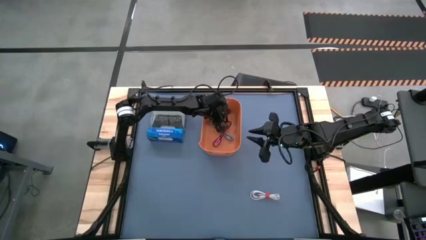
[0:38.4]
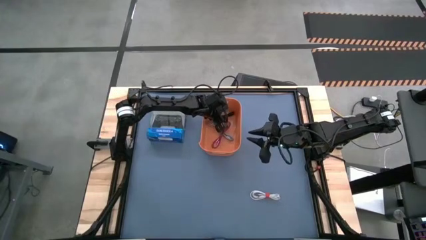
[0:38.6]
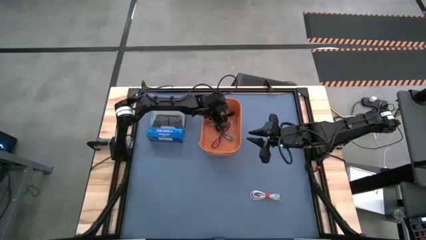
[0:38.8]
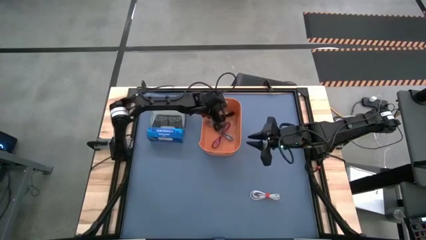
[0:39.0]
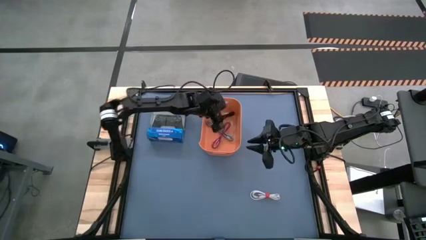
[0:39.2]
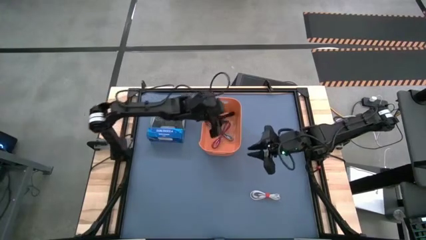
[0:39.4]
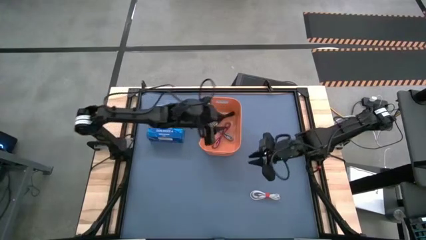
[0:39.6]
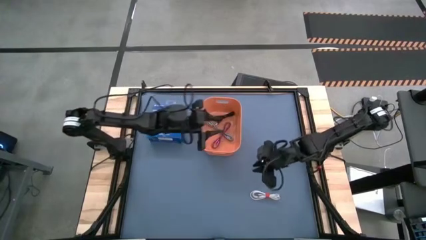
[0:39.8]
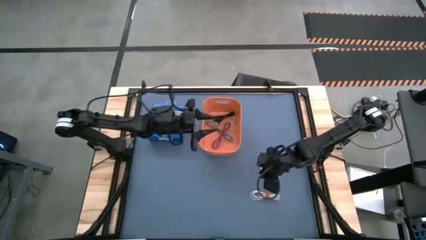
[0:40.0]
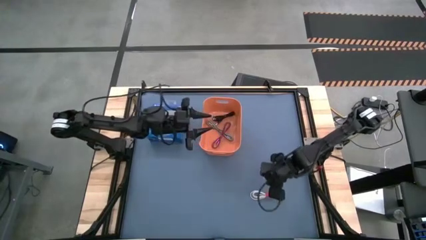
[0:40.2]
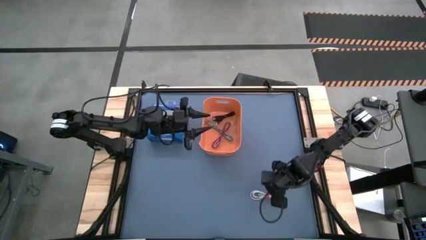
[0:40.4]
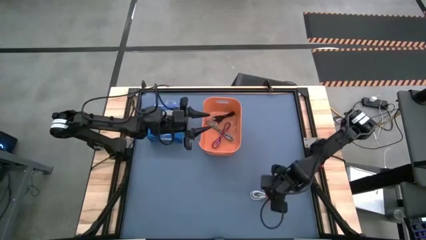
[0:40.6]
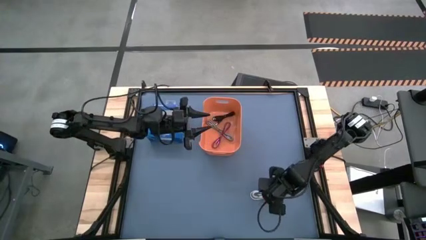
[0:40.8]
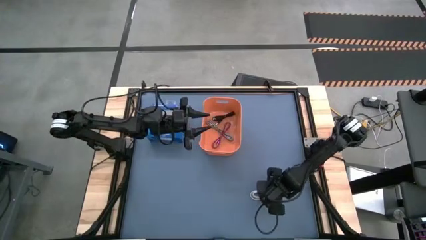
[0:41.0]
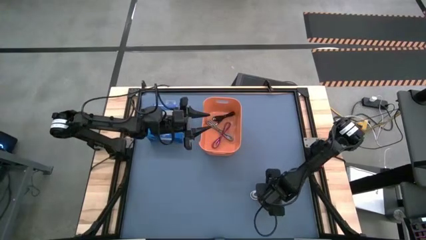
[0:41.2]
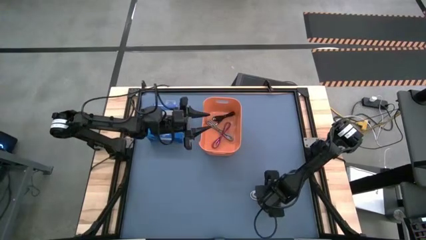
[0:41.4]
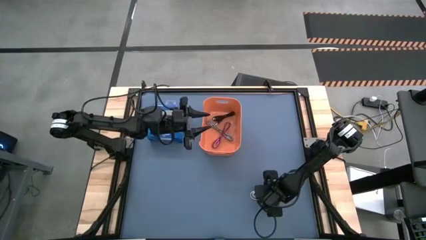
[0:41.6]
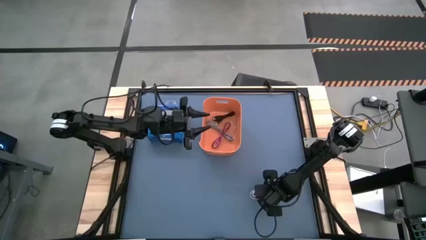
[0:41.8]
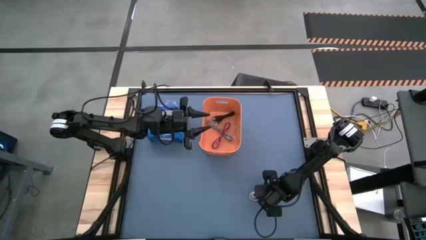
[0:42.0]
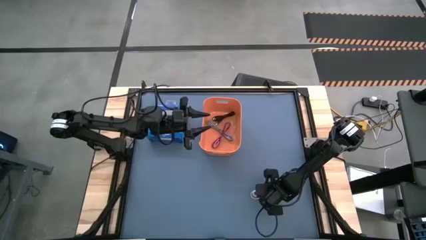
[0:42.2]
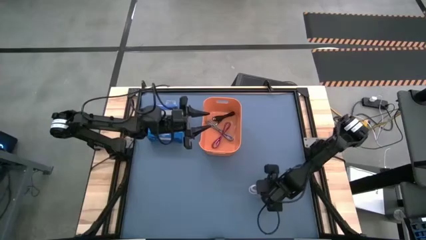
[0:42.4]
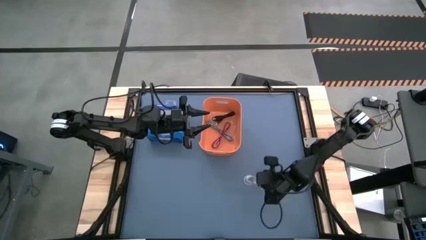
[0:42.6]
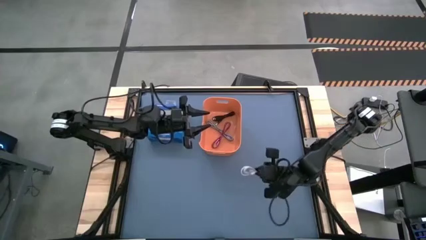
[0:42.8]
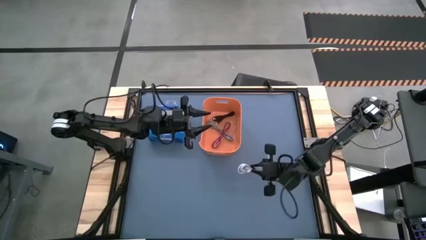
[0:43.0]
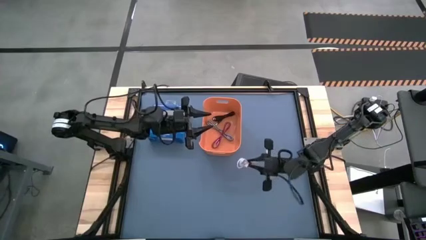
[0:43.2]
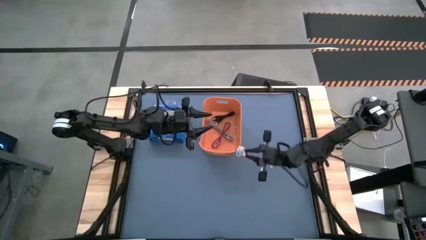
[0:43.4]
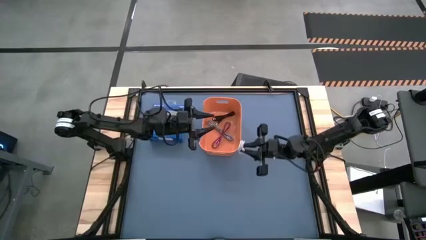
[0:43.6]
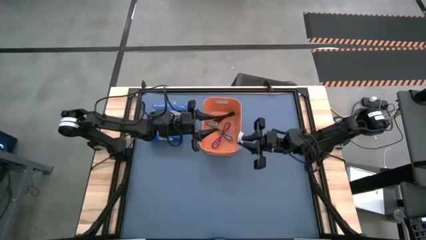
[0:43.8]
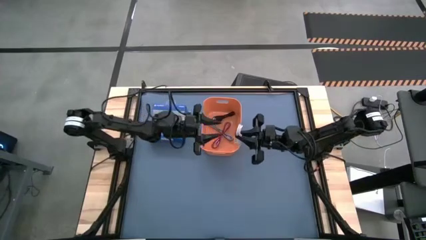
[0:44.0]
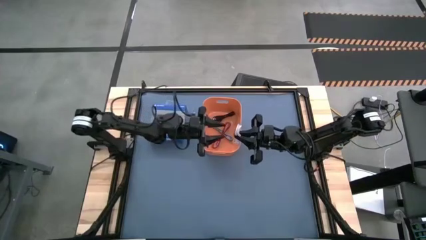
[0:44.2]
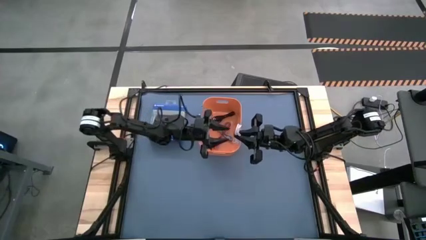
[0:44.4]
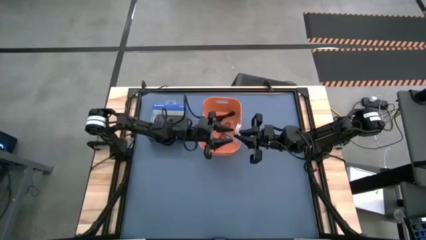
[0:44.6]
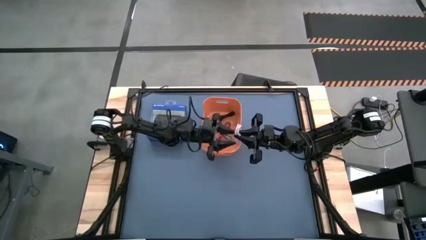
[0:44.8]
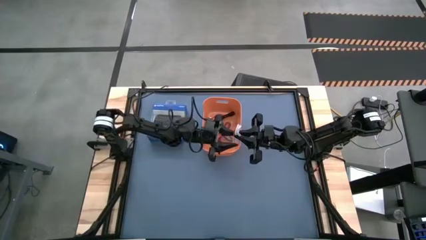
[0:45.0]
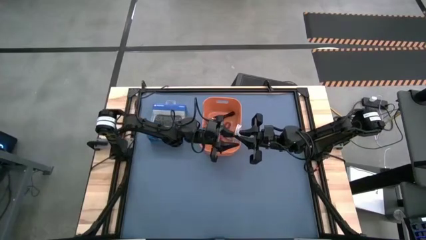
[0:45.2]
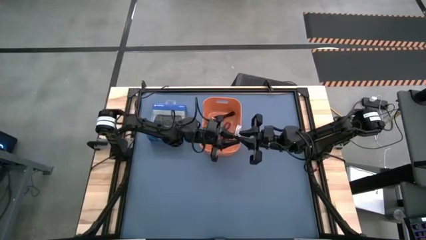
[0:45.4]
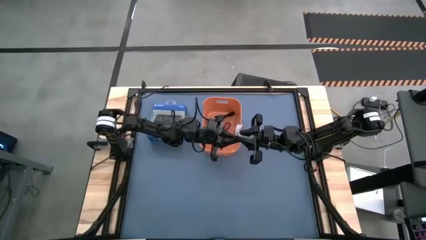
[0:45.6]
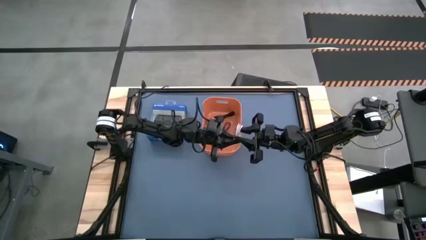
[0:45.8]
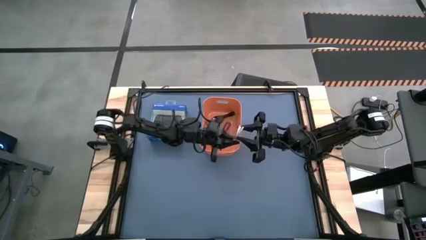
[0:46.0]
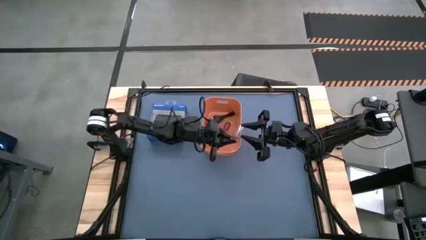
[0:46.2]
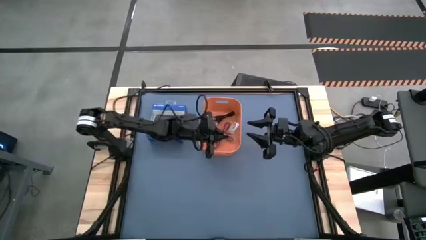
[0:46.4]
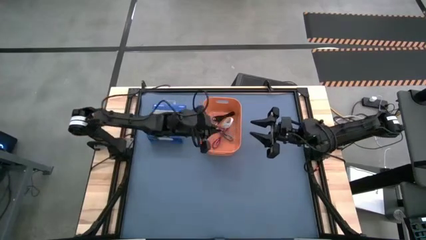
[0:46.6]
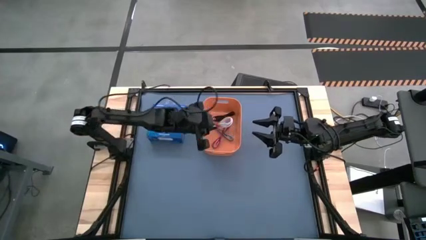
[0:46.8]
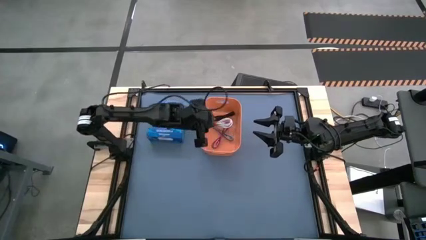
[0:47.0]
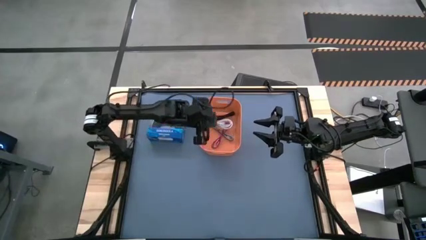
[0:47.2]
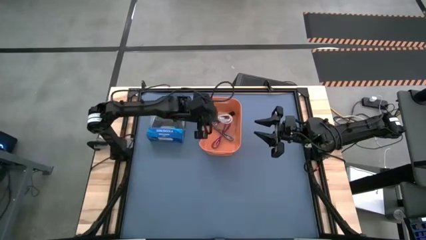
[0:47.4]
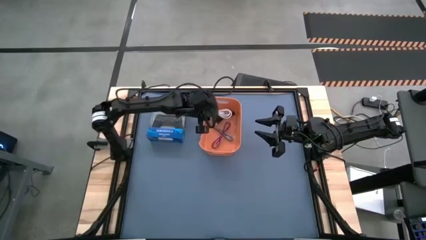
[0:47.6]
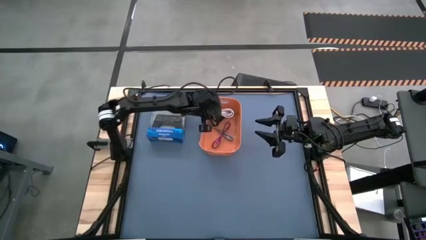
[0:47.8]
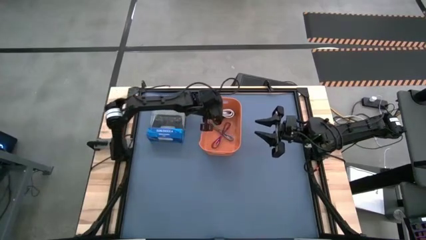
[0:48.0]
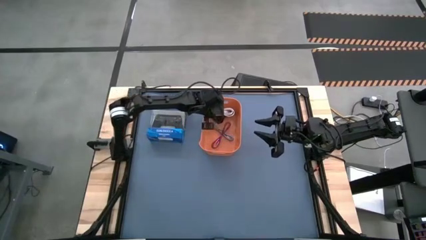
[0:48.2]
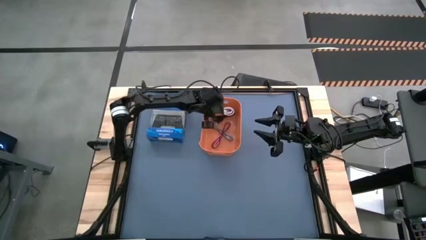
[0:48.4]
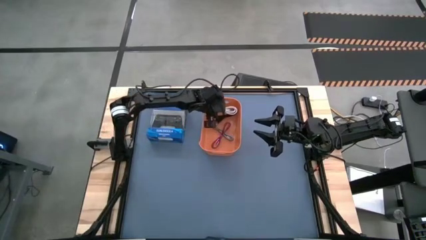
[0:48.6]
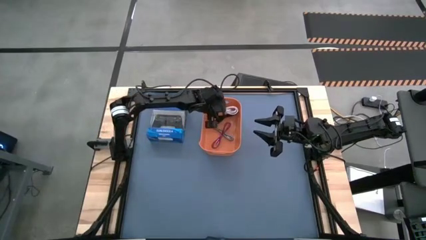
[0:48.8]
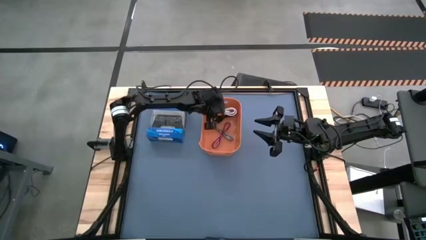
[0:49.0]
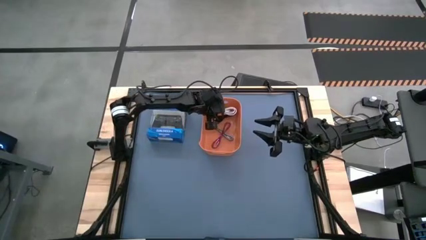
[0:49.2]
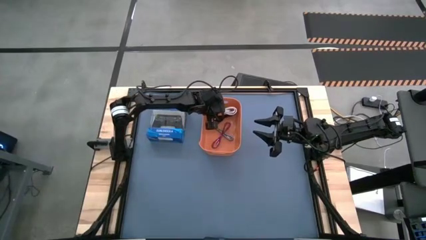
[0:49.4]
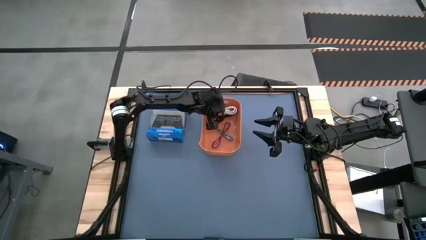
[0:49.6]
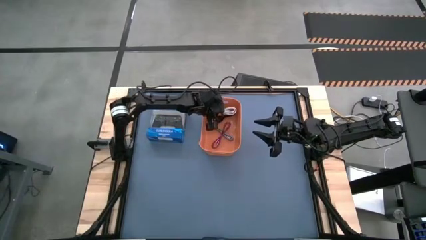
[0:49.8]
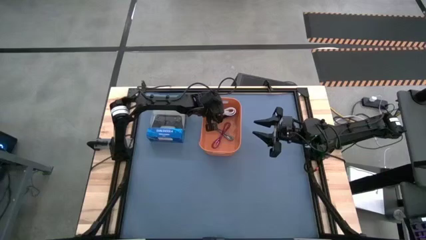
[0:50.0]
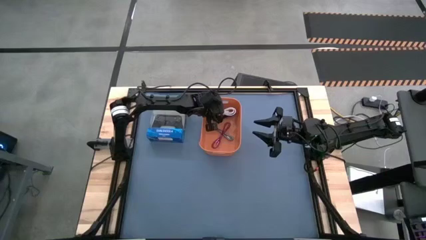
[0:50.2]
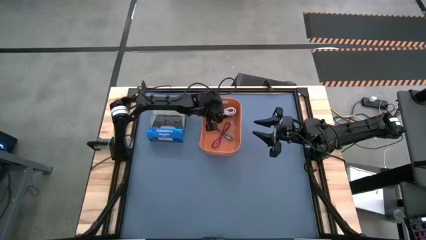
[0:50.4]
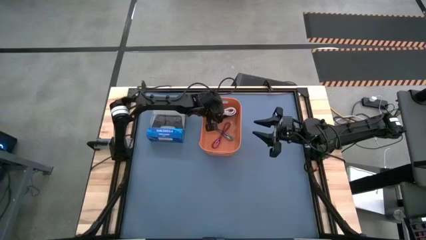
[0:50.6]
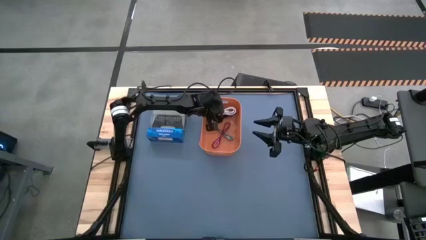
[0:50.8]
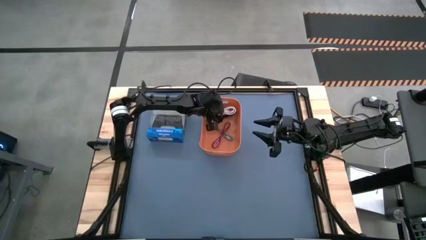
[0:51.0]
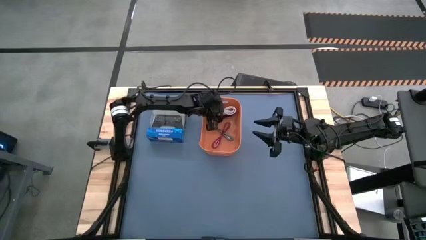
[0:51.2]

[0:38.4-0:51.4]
Task: Pick and place USB-C Cables
Put the white charger cable into the orange bin

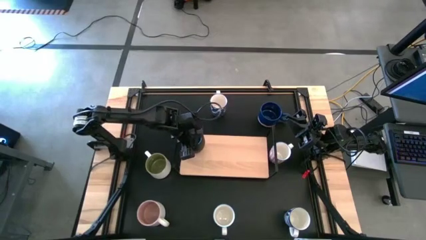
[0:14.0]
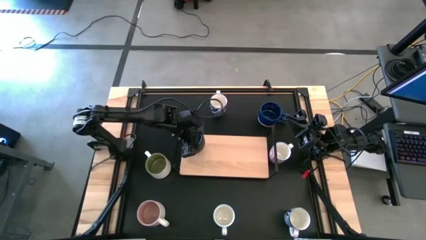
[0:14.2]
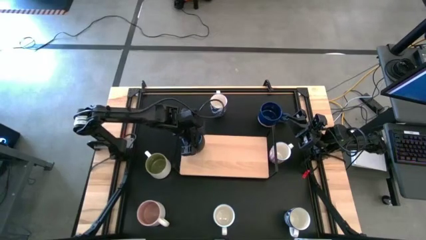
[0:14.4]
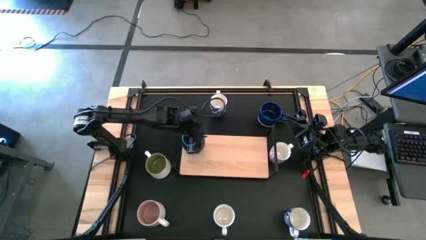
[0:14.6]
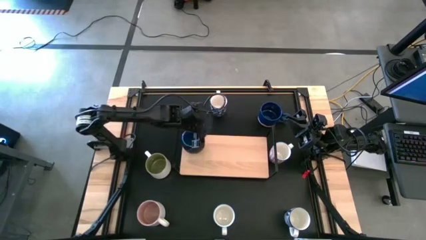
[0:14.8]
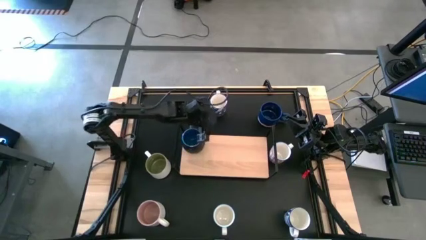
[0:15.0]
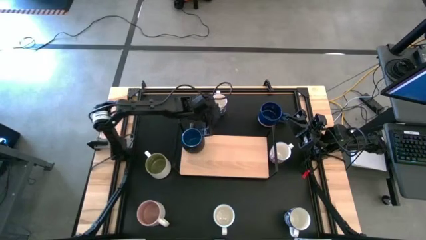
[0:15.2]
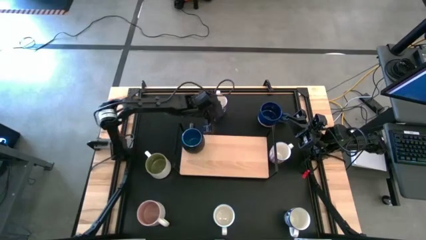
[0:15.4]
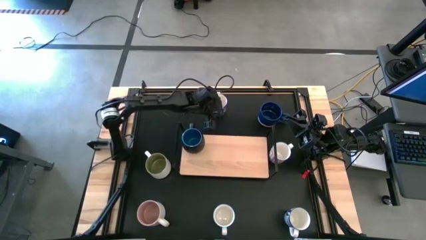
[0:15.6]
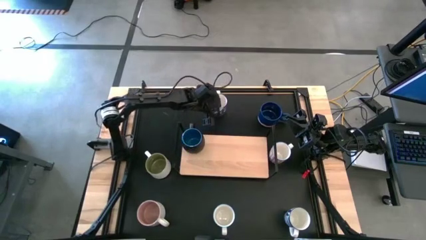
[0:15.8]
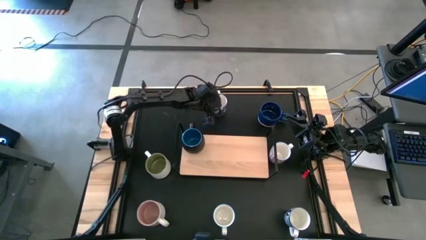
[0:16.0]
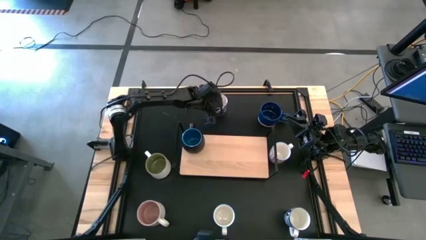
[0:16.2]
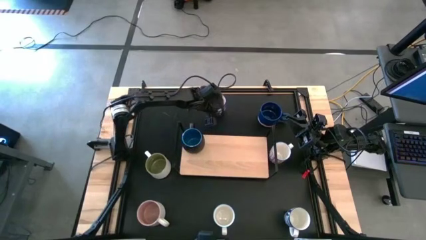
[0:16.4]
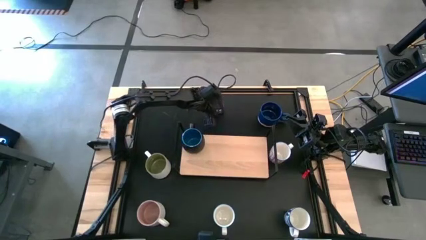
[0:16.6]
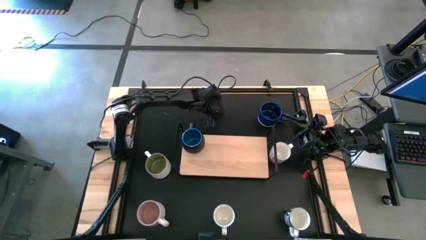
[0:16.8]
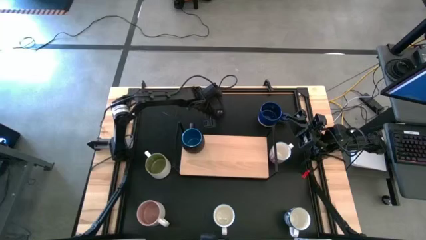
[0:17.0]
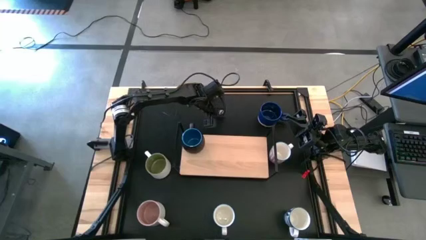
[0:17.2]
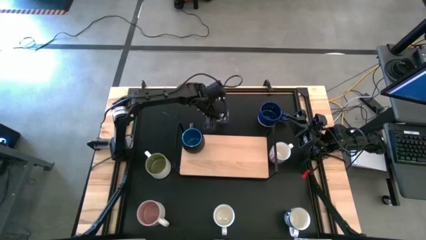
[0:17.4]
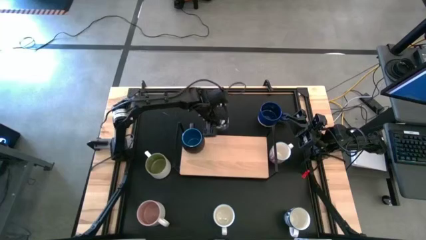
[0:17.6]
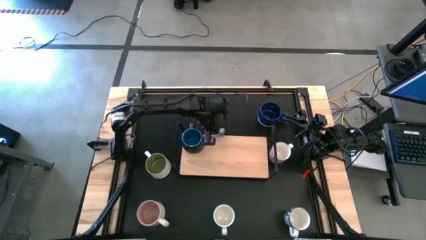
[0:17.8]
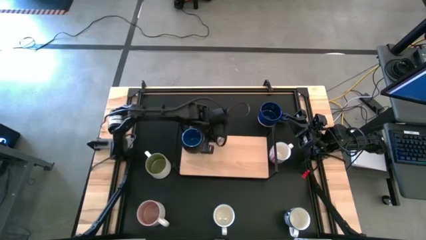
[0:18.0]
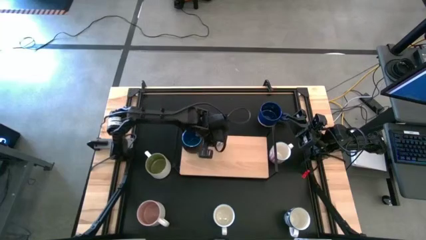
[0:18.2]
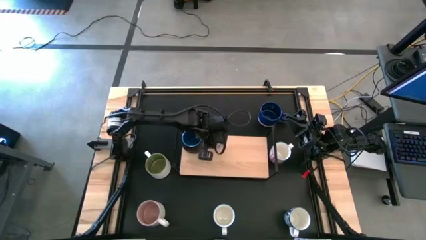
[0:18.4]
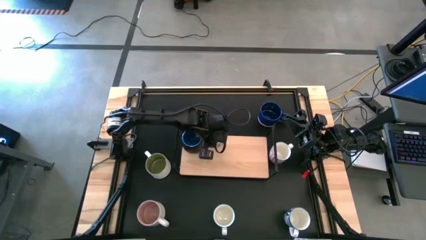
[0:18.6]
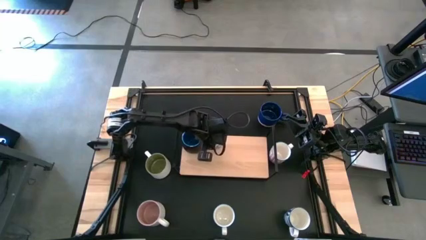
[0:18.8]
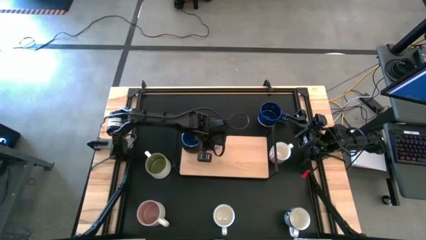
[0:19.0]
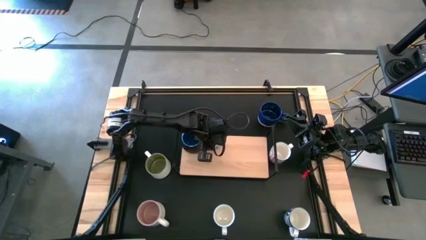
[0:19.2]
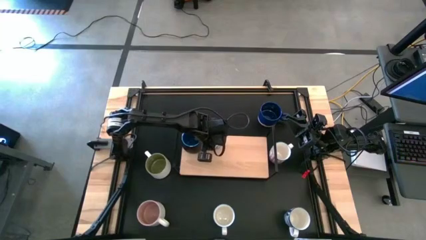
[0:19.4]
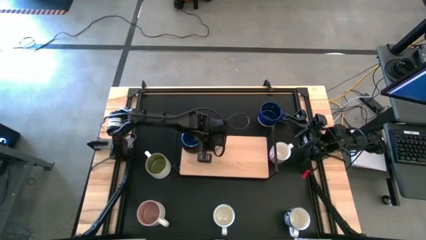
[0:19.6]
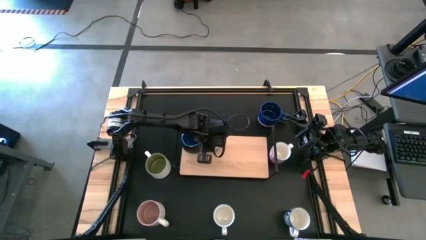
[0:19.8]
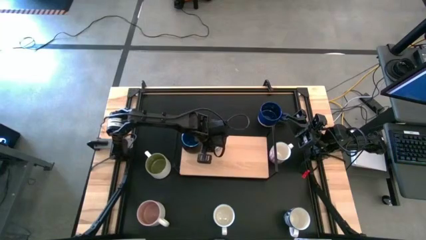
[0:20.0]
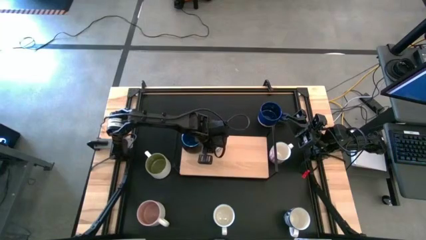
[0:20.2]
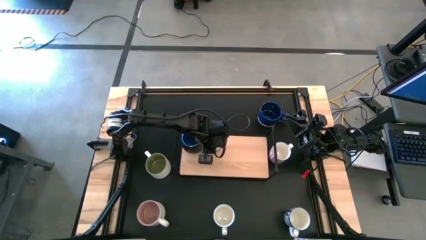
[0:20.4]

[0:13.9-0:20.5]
Task: Place coffee mugs
Put the top blue patterned mug on the shelf
